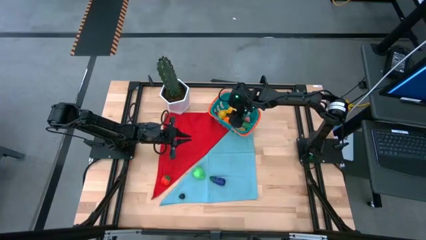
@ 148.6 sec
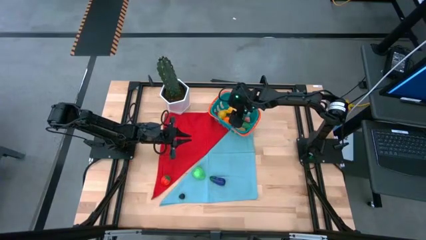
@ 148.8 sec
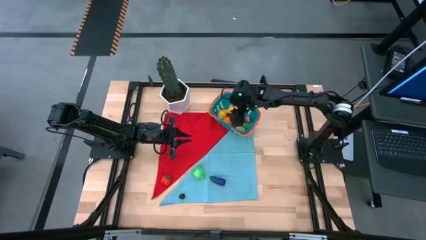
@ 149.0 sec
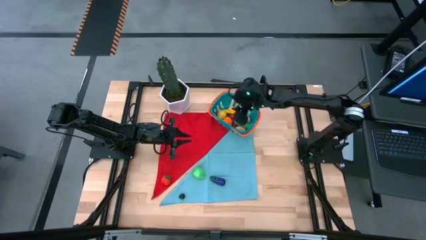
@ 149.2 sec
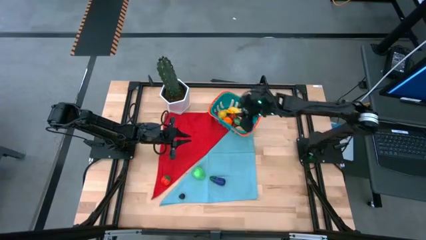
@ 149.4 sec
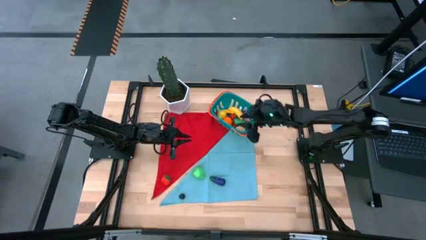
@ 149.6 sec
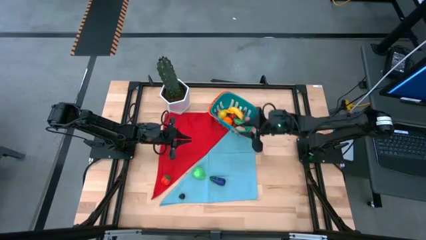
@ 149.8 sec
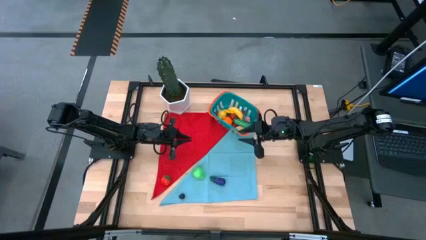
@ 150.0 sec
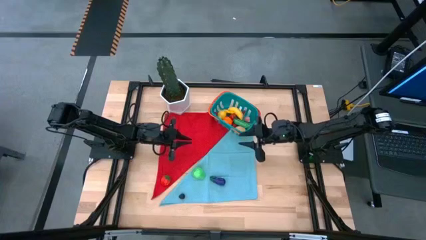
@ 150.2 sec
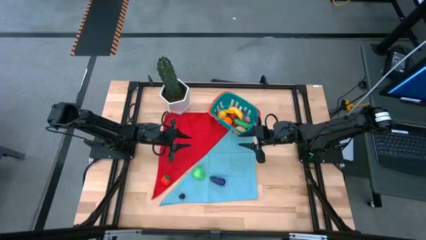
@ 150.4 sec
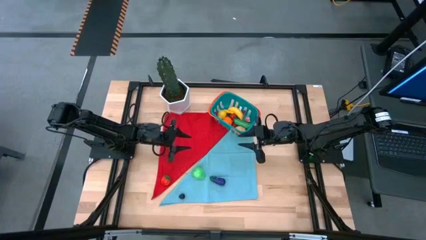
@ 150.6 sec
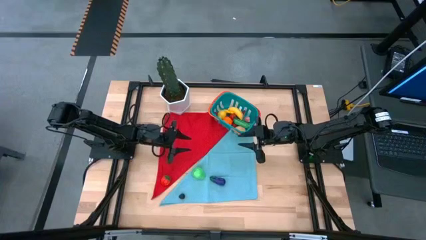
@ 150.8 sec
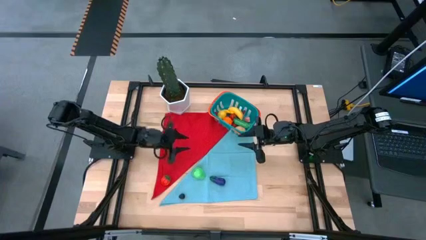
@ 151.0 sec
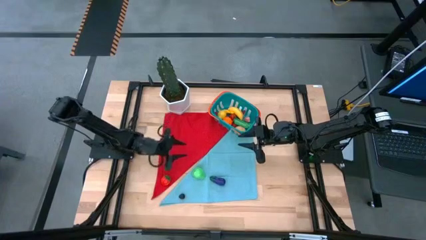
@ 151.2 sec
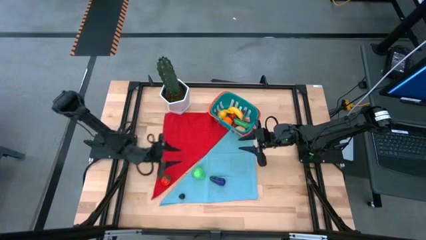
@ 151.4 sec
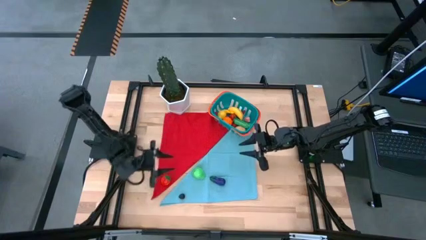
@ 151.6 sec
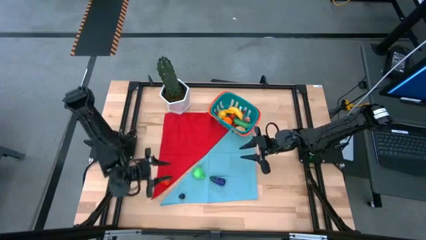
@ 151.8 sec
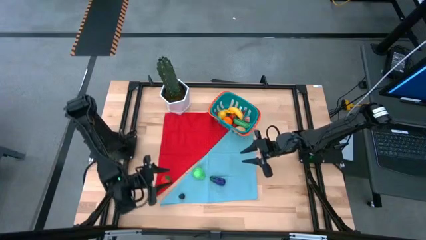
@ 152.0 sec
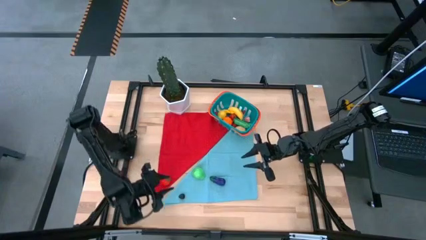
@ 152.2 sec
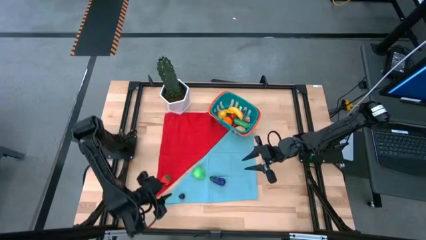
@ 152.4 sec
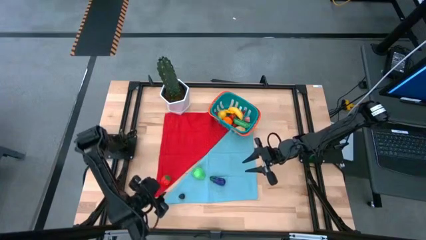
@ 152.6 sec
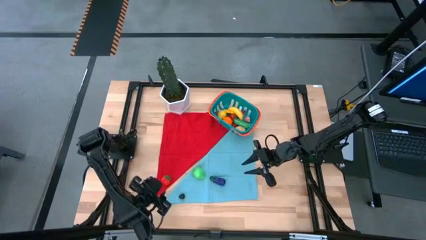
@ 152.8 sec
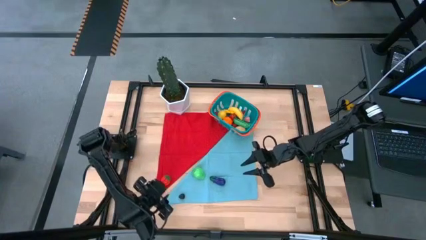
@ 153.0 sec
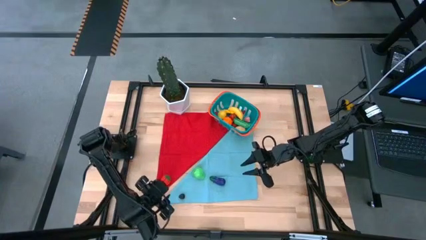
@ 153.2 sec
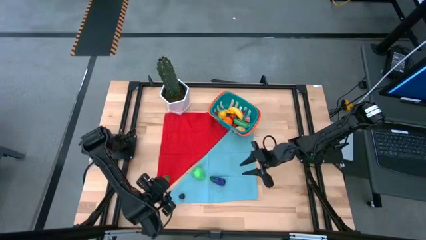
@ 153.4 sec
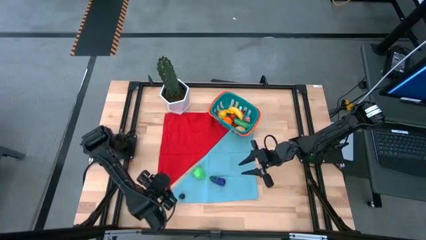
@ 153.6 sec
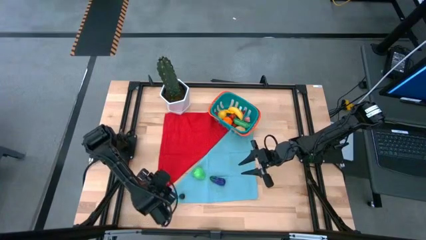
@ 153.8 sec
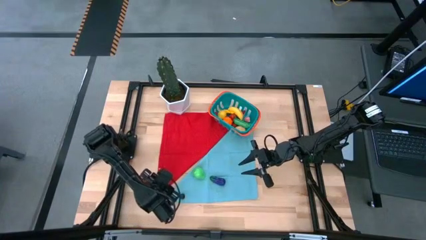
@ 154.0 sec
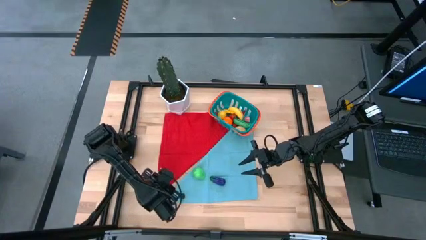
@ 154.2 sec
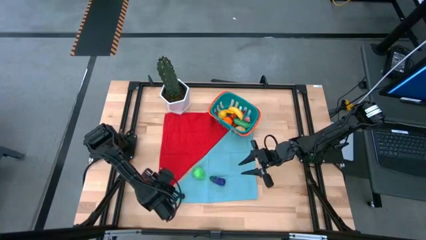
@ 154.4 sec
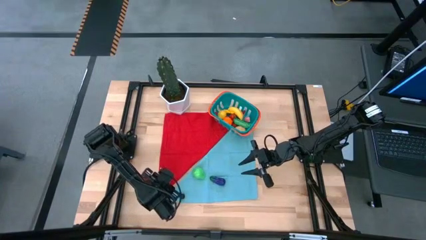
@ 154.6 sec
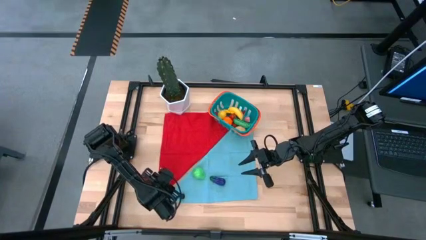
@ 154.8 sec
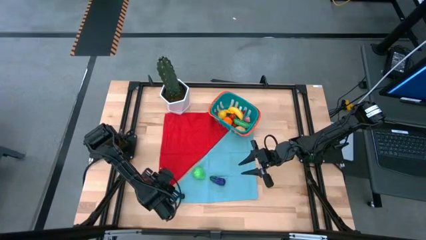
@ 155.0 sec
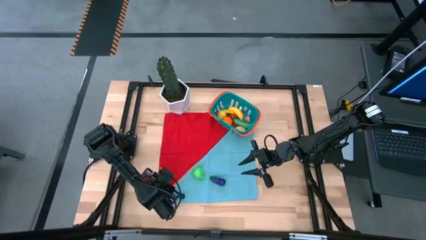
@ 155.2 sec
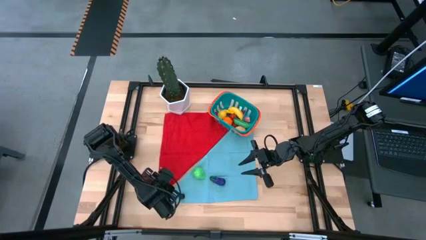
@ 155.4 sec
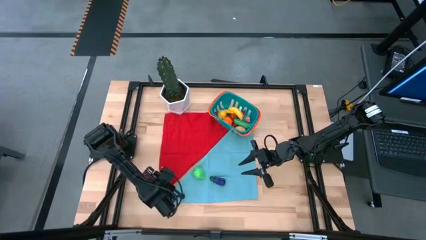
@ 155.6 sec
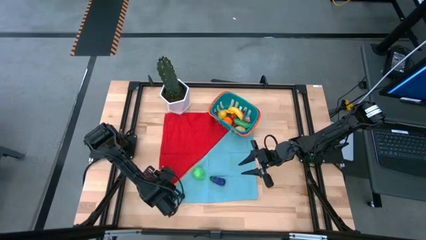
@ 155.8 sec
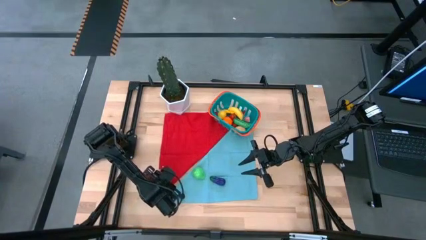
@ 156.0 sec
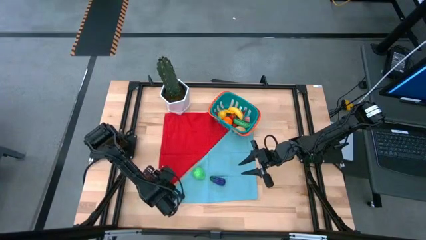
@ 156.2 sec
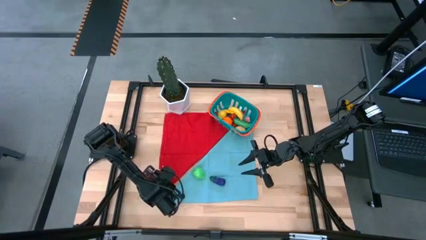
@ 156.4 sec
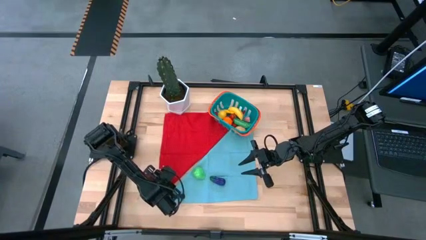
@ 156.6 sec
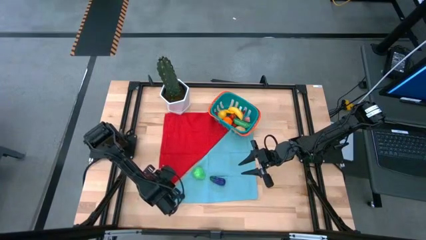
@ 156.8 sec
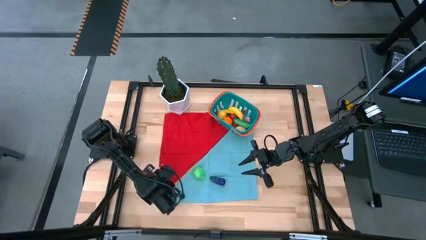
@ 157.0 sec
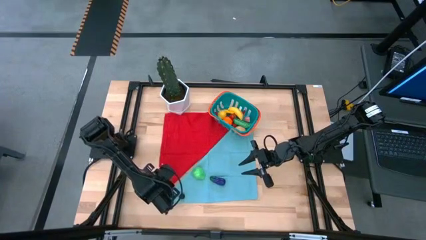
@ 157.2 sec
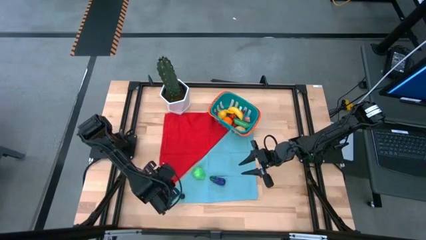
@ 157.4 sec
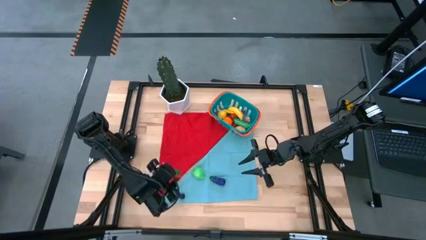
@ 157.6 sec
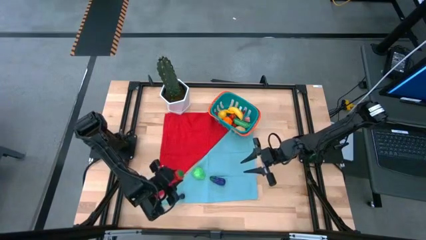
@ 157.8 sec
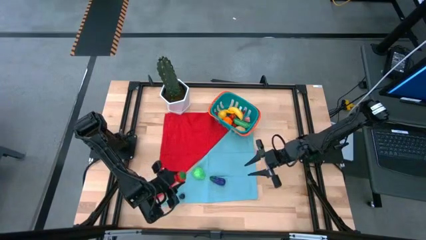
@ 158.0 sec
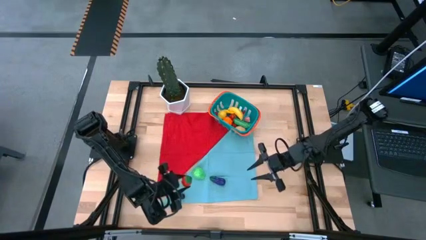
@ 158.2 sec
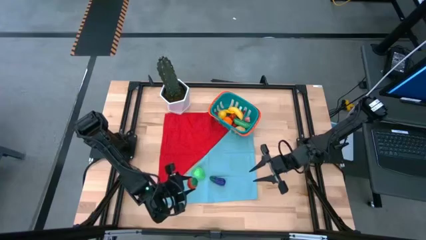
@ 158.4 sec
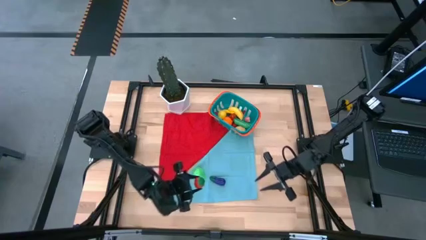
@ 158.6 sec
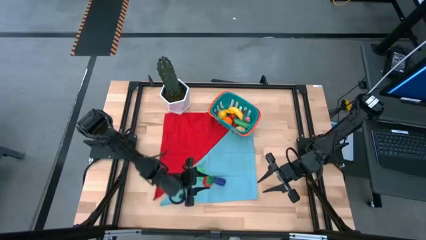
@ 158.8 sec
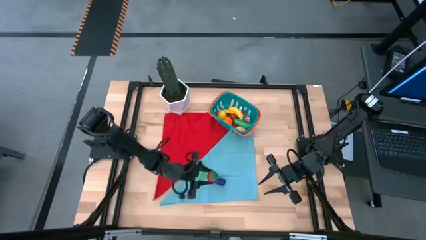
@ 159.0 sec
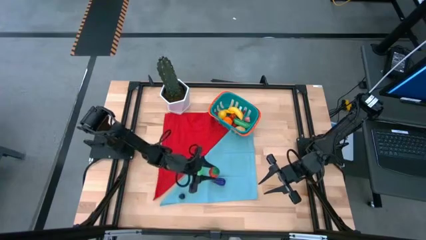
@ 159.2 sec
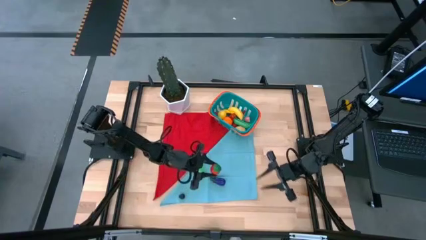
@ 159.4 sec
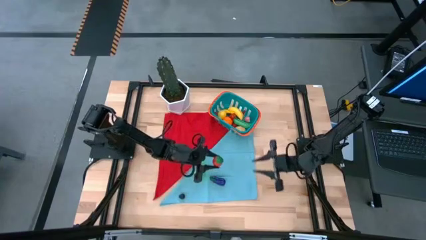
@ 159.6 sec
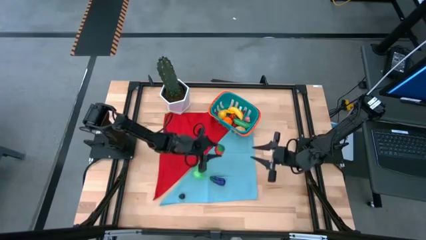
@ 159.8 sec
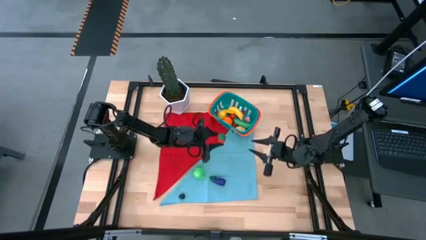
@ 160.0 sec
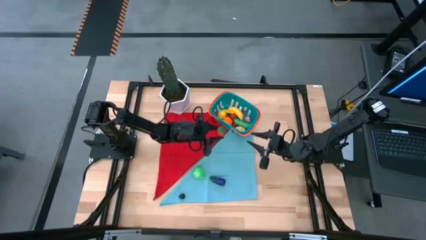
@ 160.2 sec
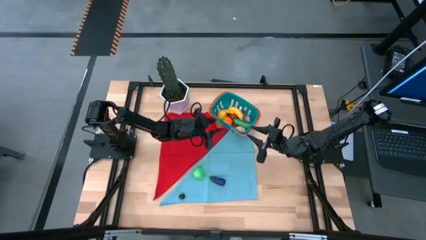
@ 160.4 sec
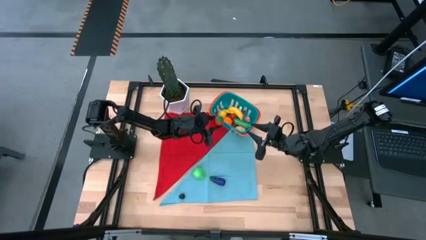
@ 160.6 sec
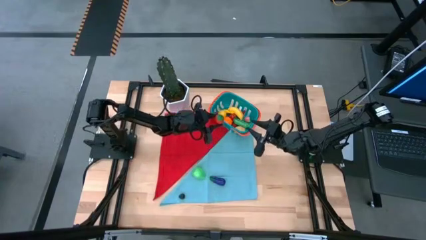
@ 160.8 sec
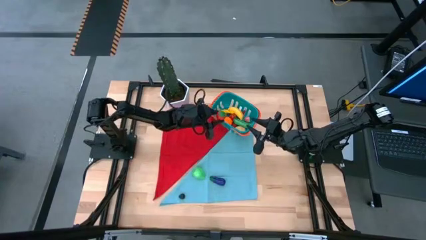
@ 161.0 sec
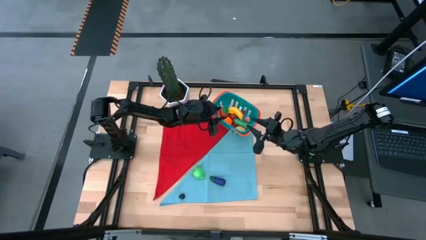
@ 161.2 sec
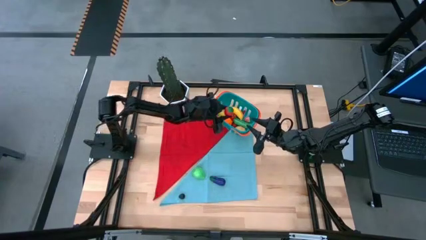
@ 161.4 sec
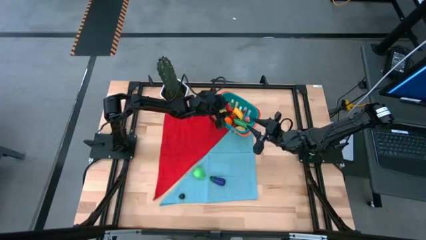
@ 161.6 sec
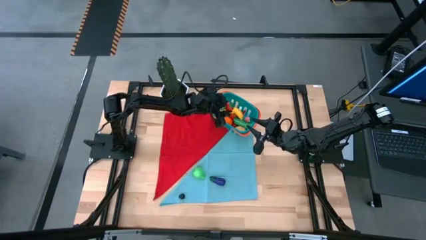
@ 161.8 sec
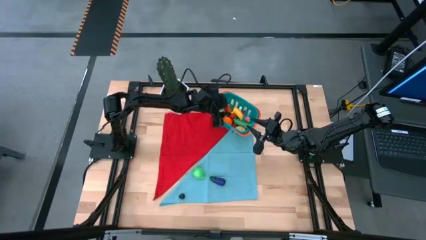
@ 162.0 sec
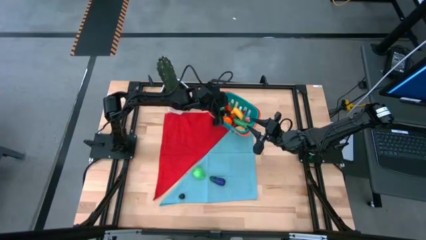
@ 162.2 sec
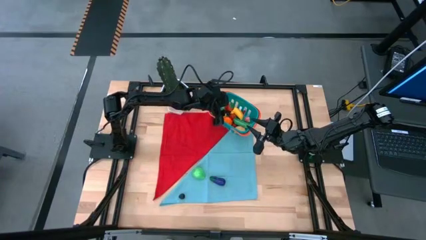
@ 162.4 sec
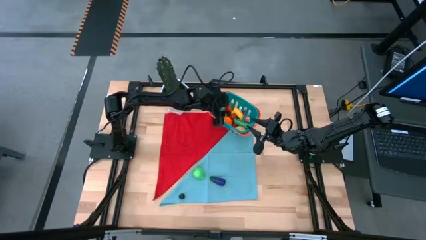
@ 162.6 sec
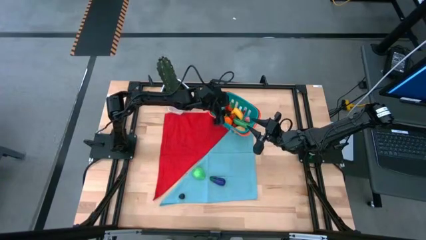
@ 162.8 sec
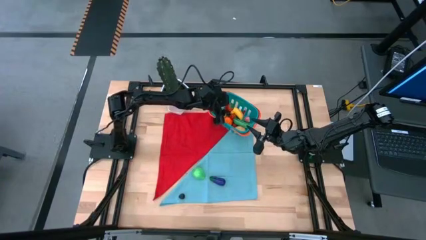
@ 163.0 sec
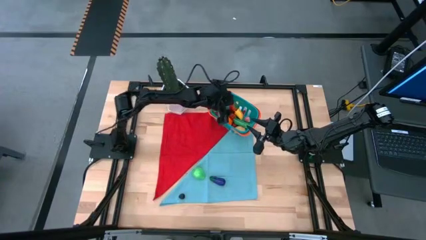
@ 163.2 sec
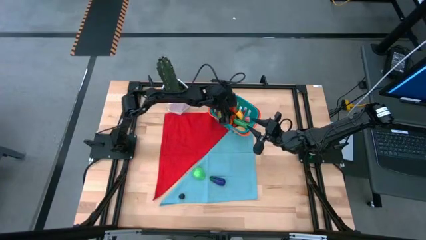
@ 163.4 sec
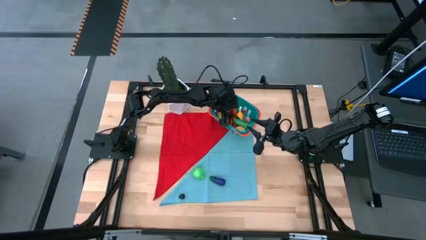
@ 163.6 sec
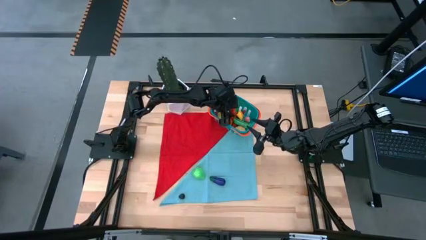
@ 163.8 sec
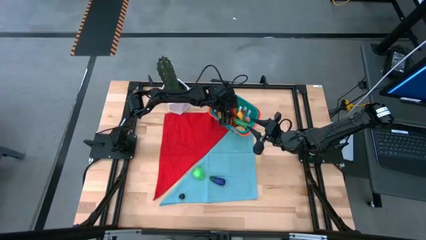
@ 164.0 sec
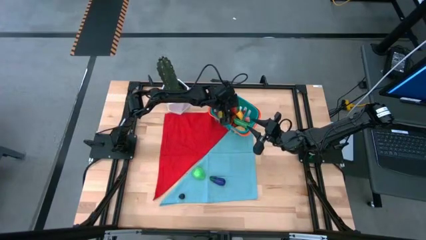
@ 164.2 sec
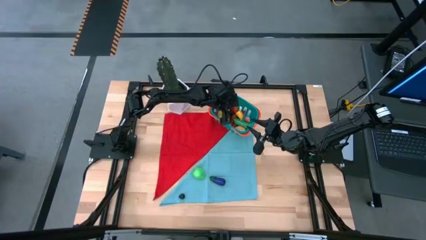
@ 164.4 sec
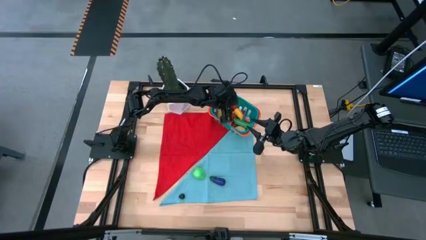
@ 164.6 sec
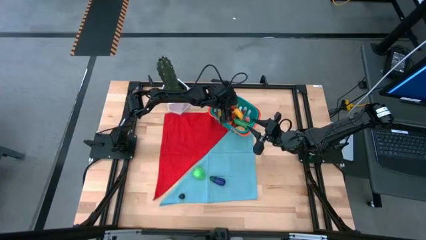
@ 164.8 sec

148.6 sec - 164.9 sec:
Task: Pick and placing Produce into tupperware
Put the red strawberry into the blue basket
